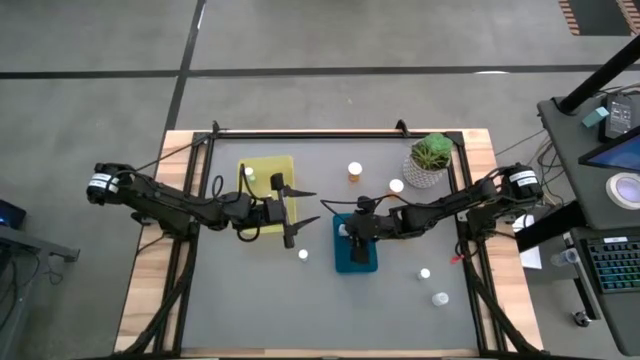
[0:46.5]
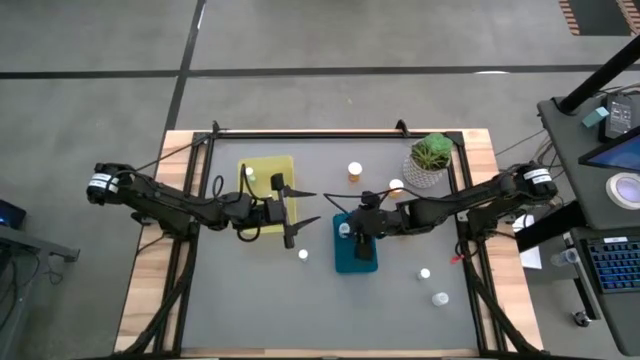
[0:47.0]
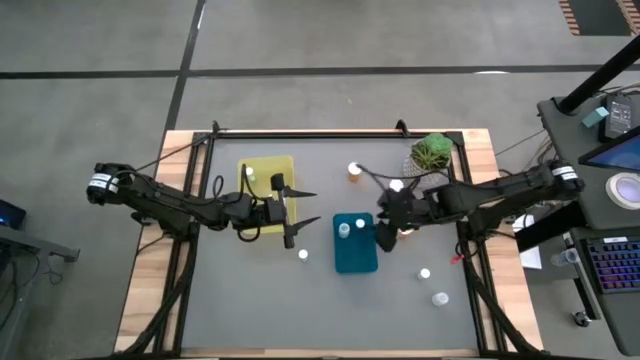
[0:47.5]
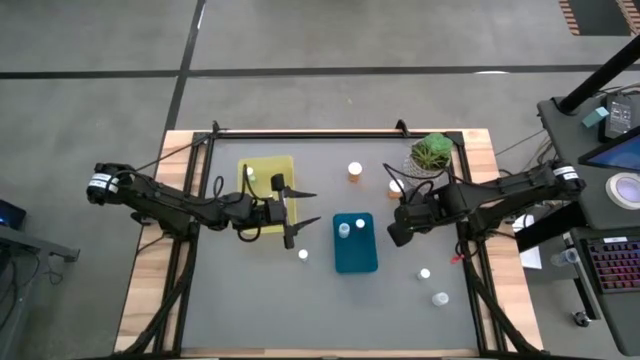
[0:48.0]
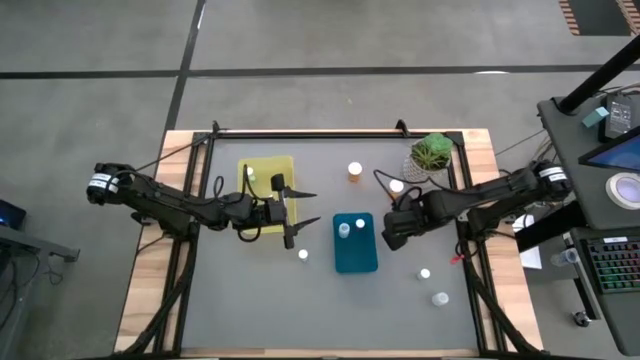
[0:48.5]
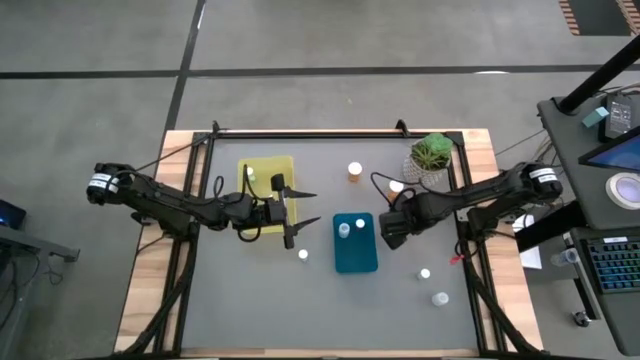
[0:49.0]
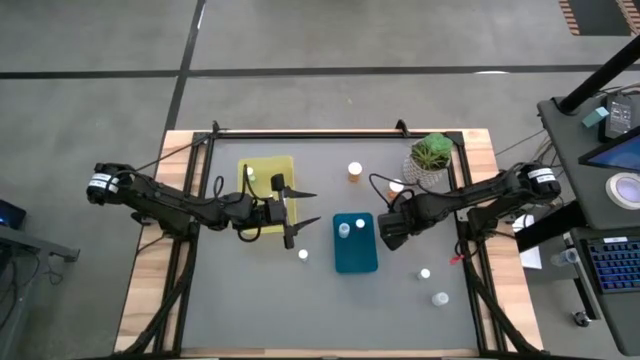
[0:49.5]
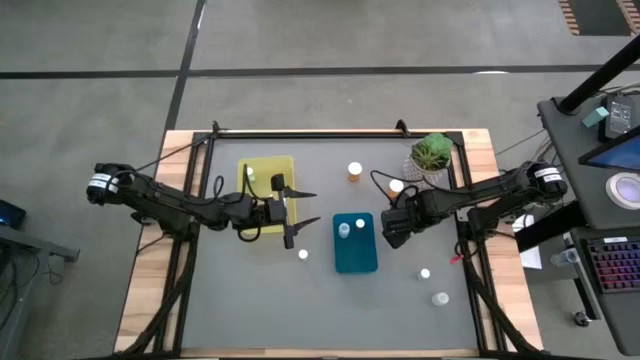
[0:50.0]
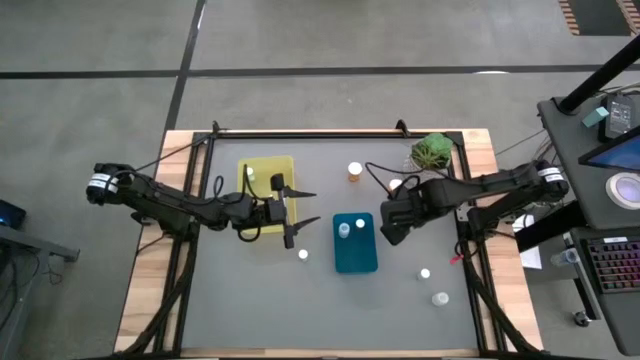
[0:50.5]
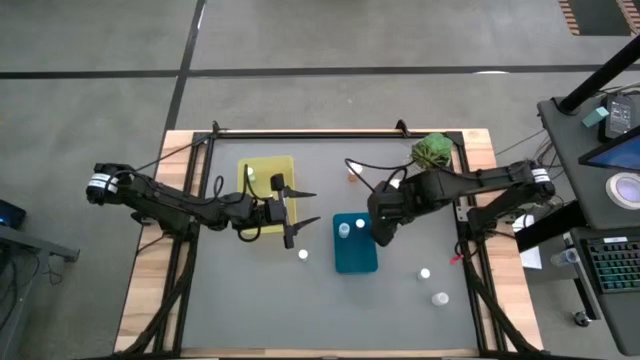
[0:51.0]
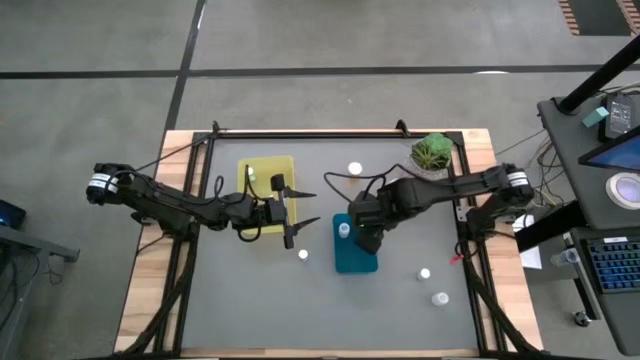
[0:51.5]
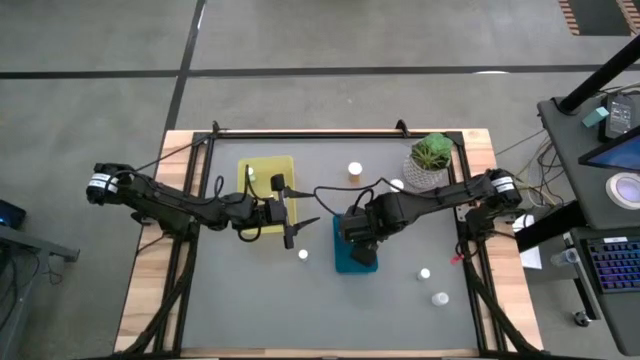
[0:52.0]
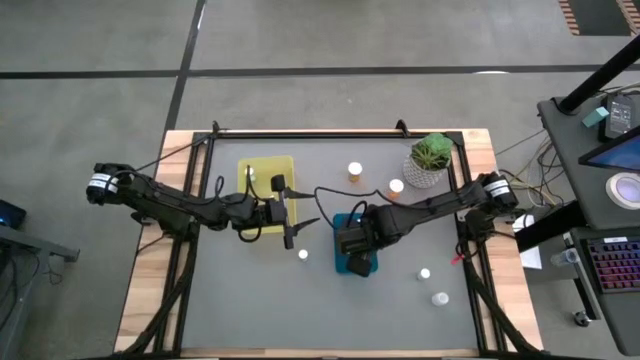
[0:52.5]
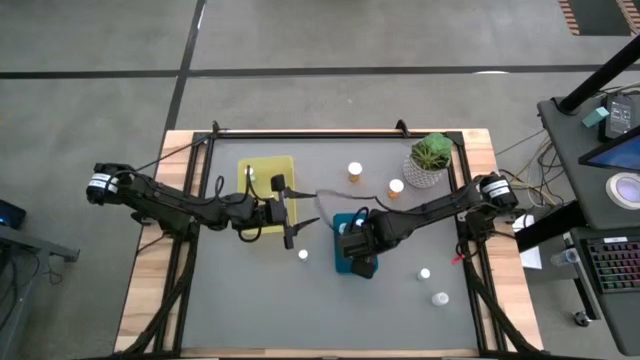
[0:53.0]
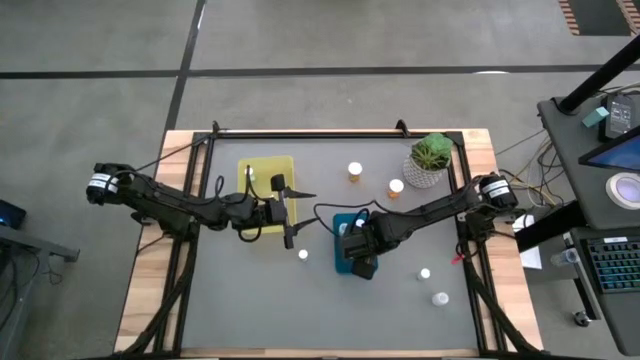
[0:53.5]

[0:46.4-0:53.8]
Task: Pick and place medicine bottles into bin by pill shape (circle, oval)
Put the bottom orange capsule bottle into the blue bin

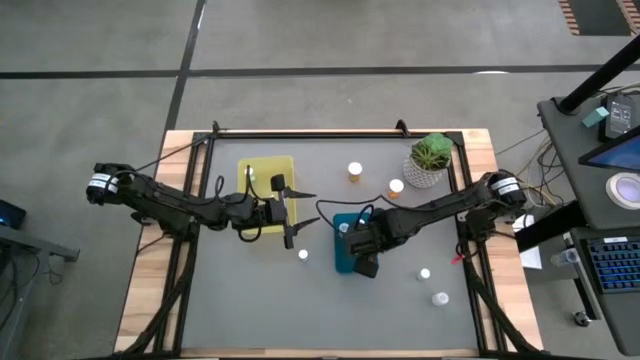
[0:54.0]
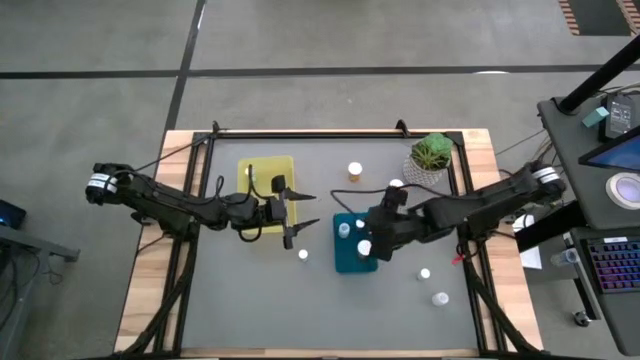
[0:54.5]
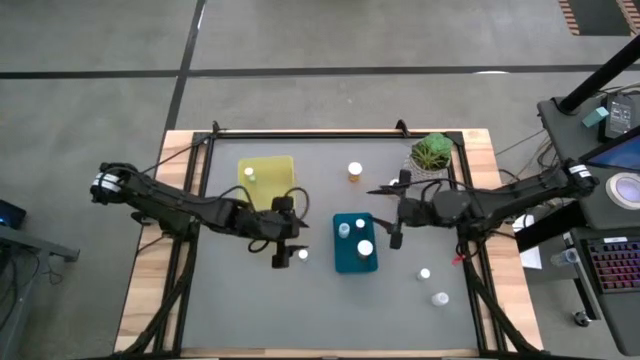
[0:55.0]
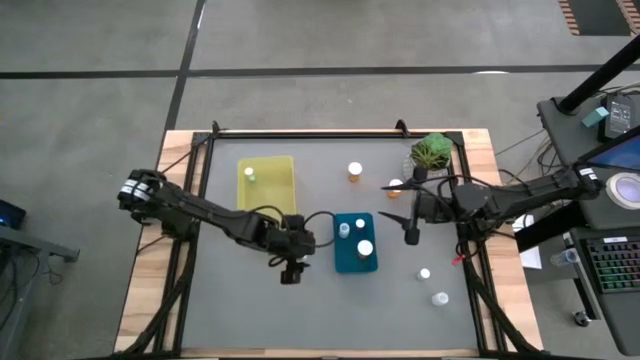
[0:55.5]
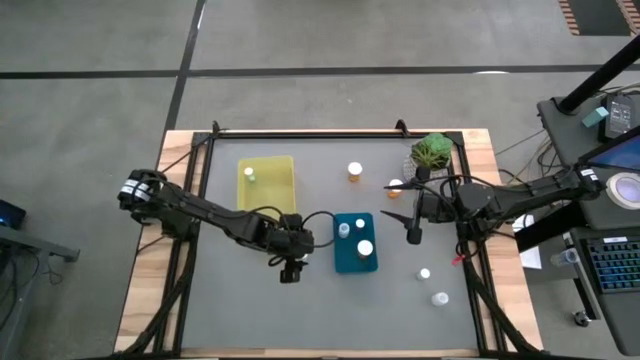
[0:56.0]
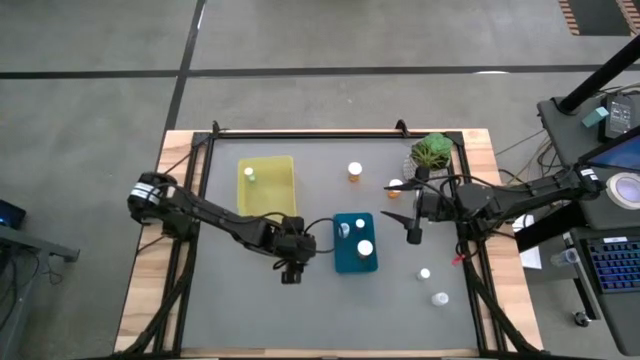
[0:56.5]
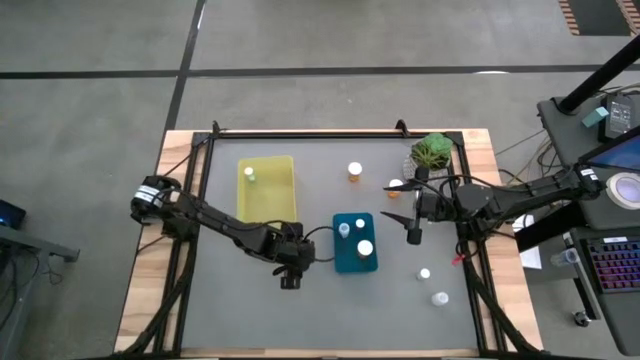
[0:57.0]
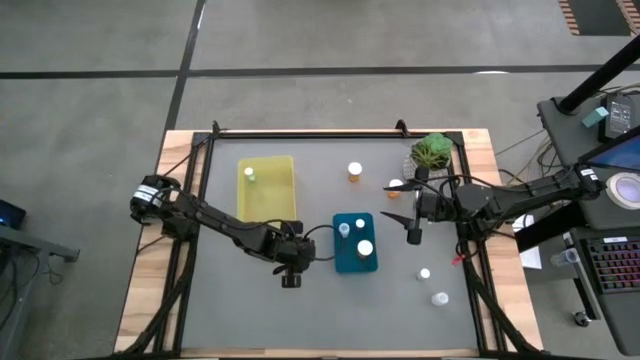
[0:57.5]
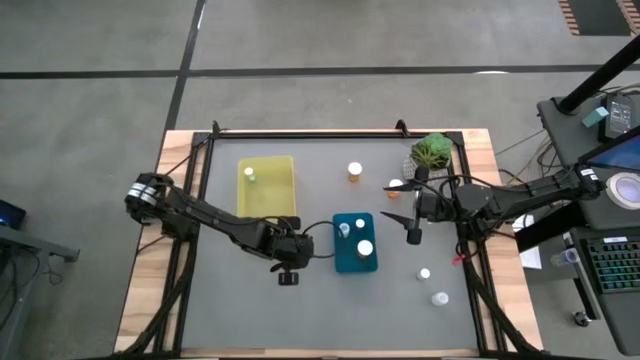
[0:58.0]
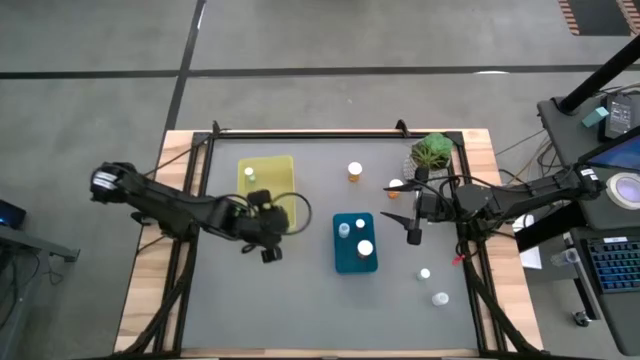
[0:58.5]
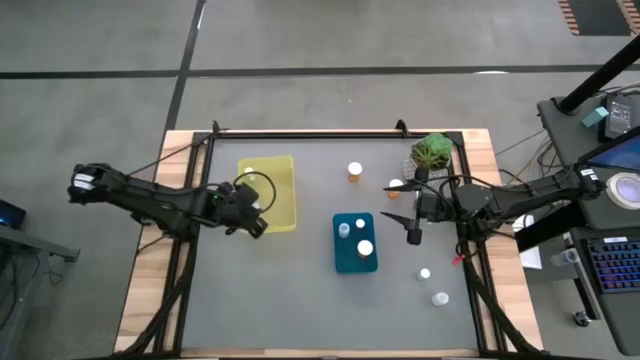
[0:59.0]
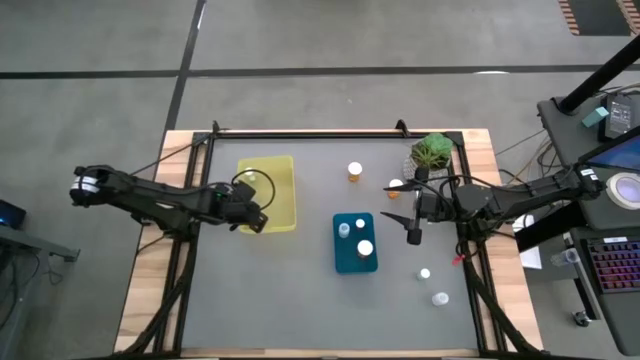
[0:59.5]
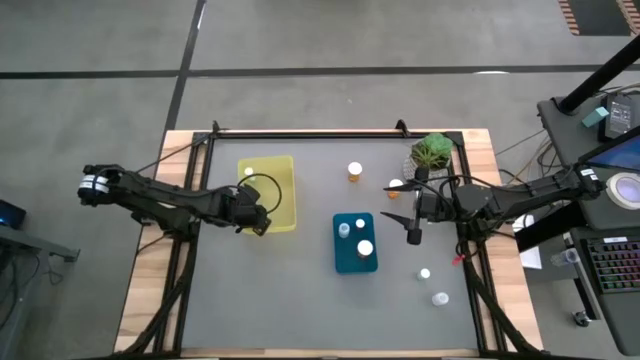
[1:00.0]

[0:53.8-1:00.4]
Put the light blue tablet bottle into the yellow bin

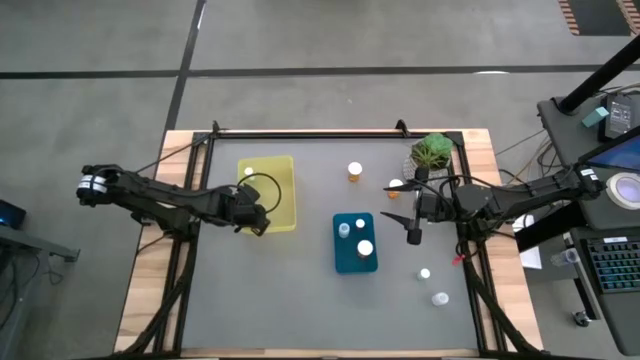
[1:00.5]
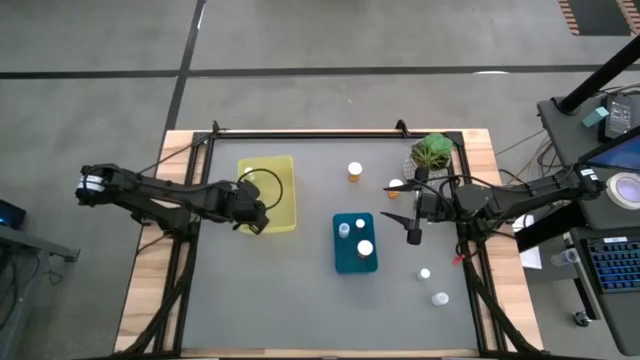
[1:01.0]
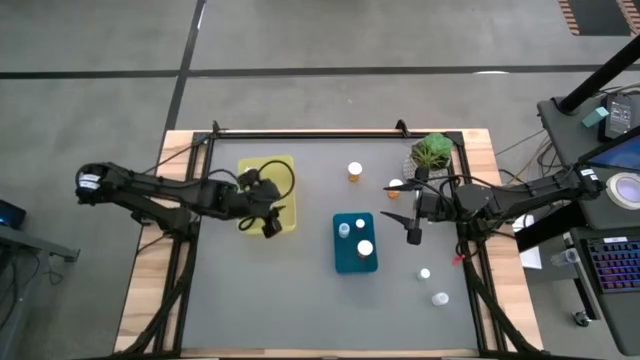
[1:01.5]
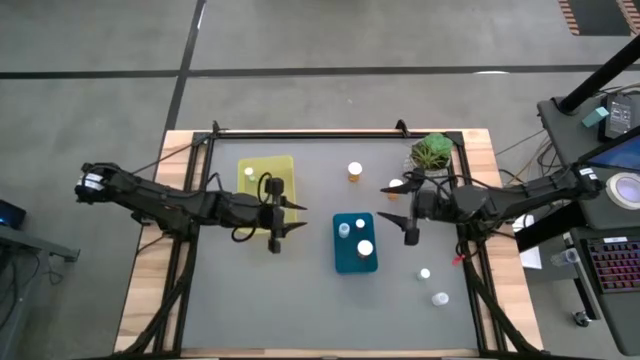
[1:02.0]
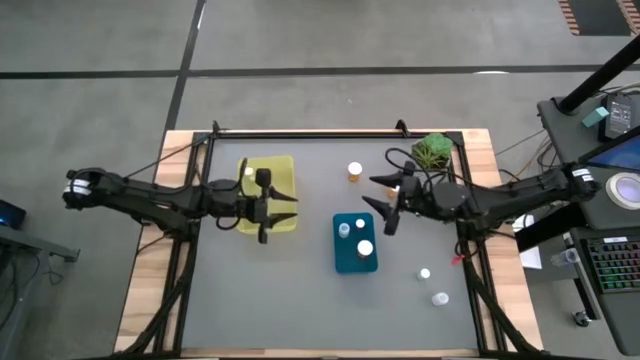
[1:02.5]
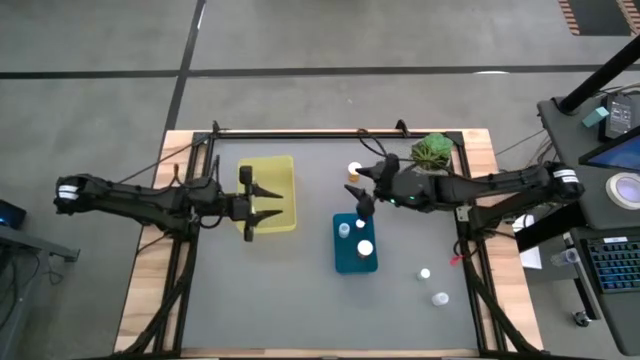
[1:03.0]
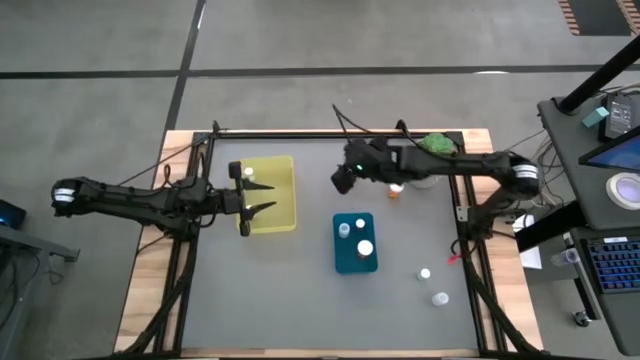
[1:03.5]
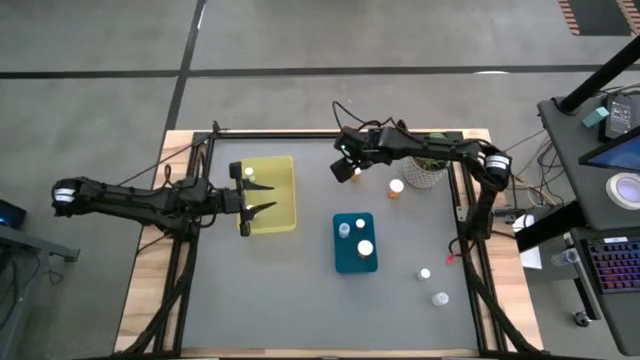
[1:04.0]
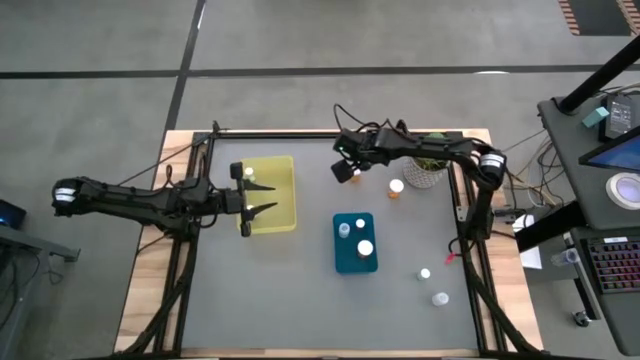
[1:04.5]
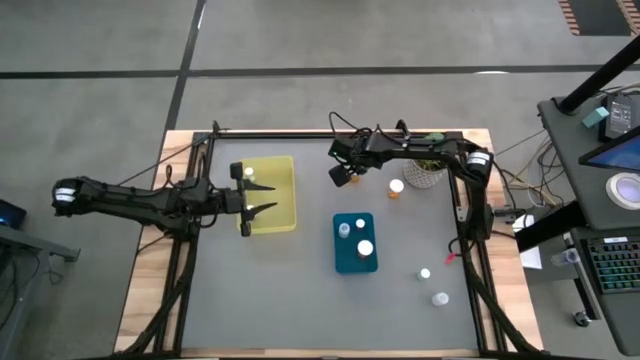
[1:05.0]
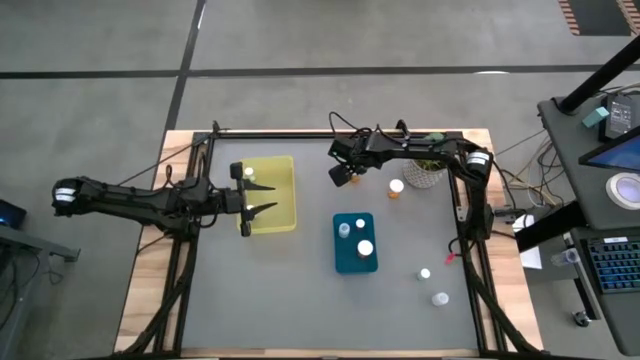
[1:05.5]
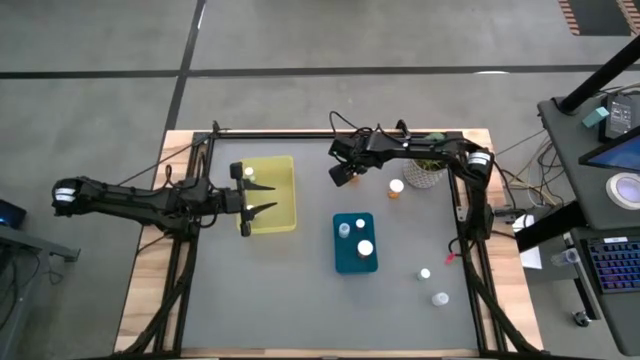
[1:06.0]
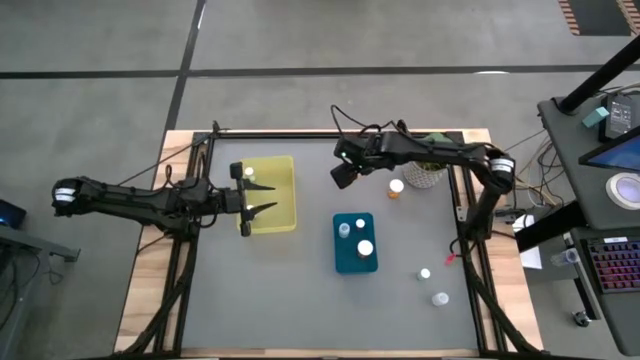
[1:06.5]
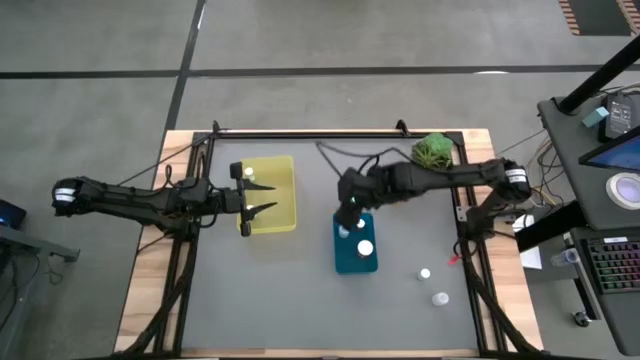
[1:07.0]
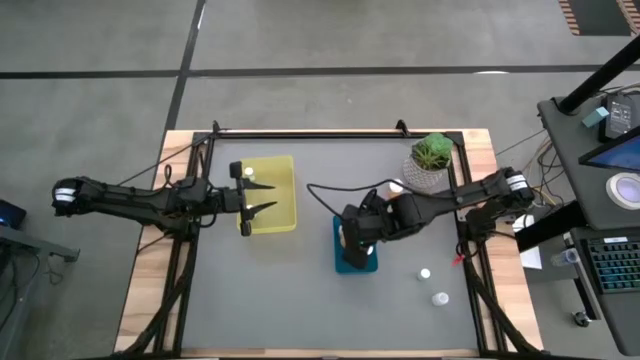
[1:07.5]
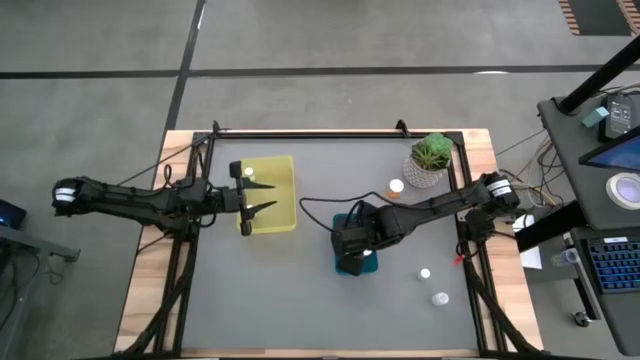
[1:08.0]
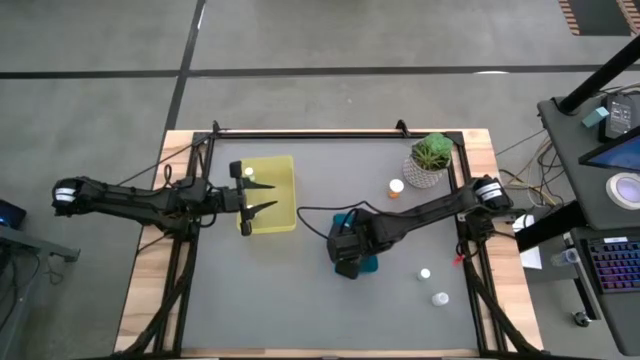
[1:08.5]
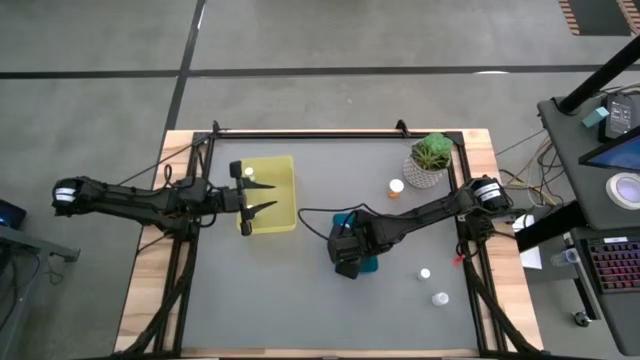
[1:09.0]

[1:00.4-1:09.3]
Put the left orange capsule bottle into the blue bin
